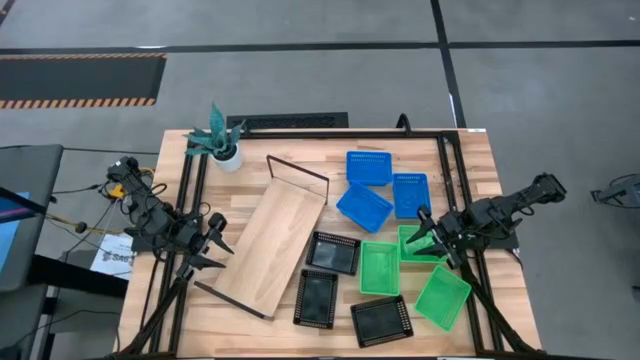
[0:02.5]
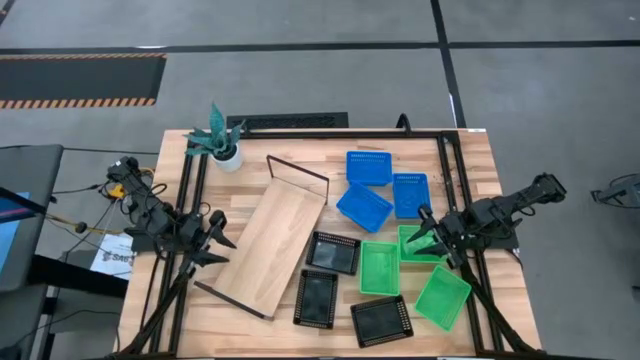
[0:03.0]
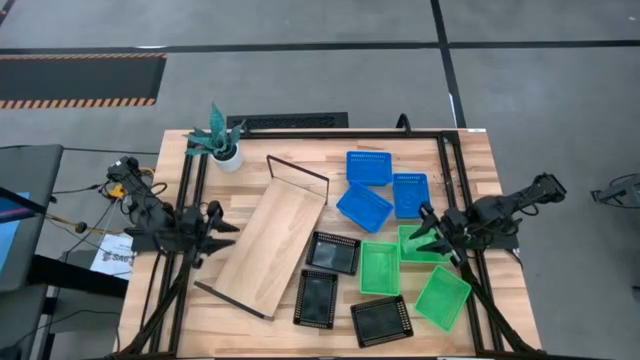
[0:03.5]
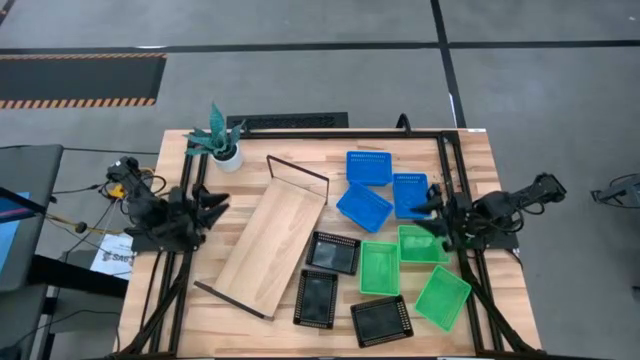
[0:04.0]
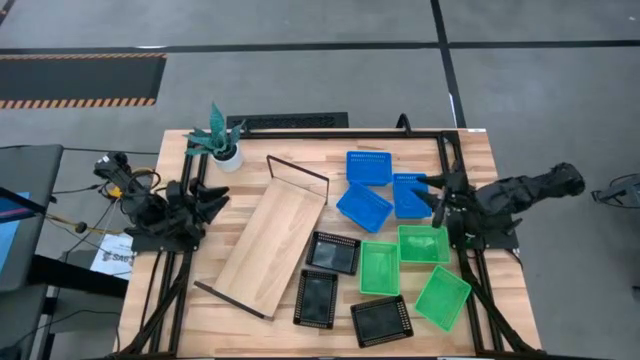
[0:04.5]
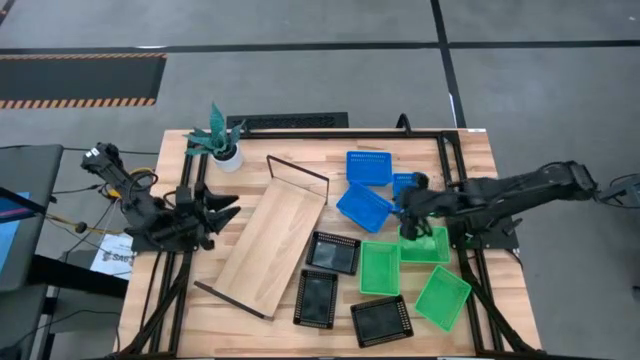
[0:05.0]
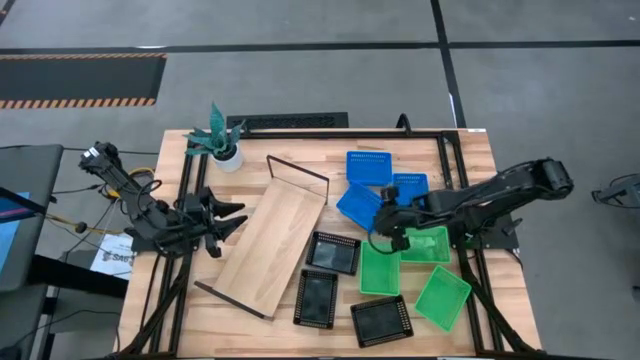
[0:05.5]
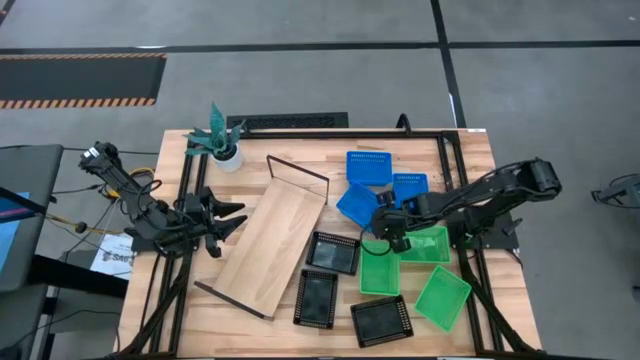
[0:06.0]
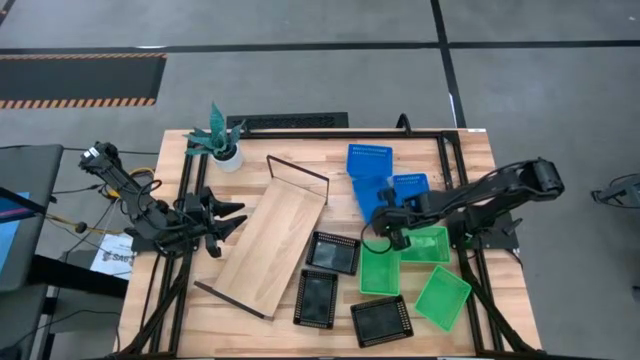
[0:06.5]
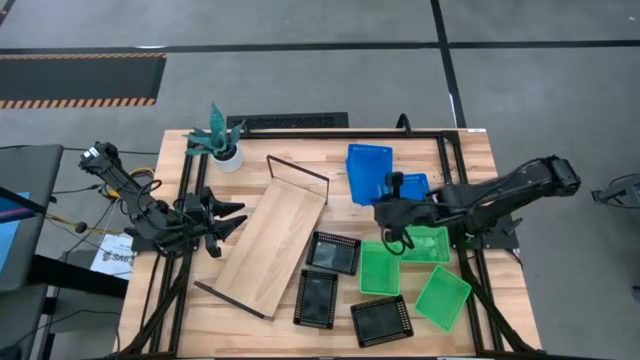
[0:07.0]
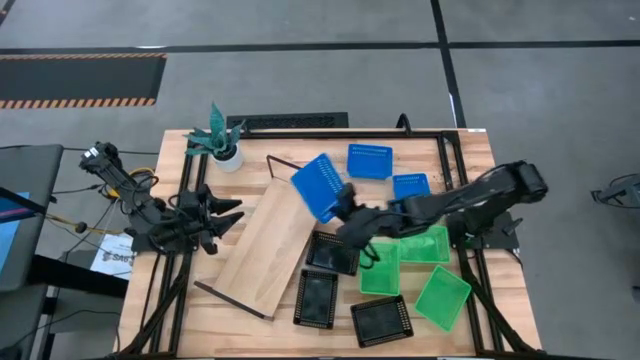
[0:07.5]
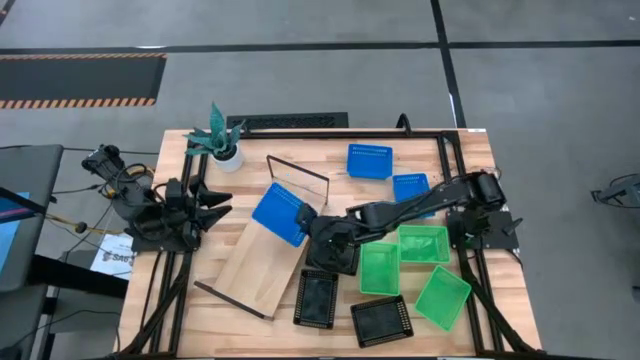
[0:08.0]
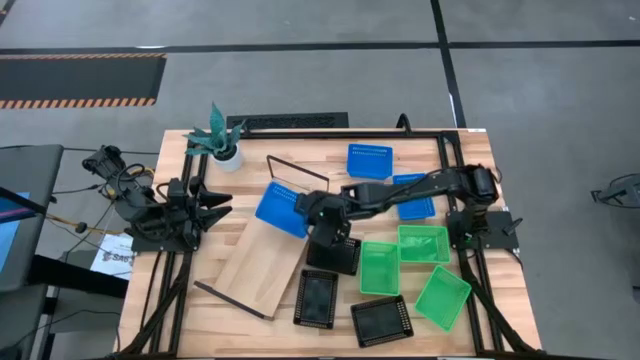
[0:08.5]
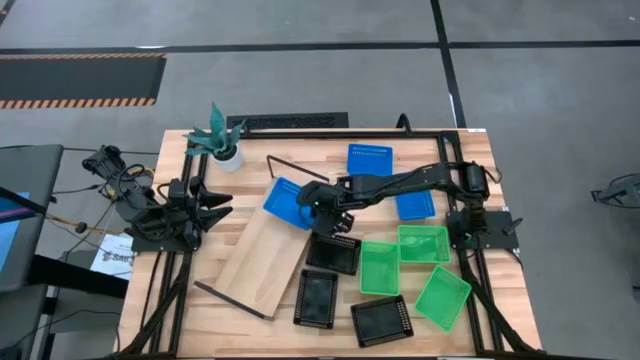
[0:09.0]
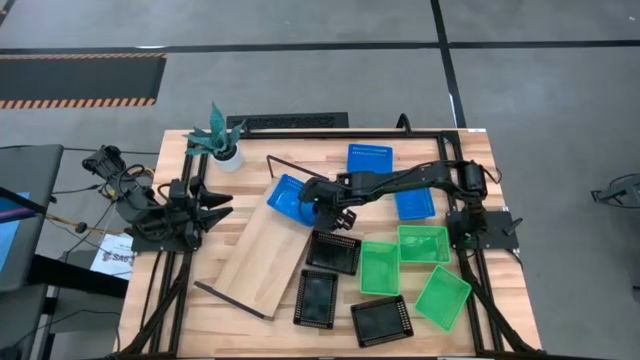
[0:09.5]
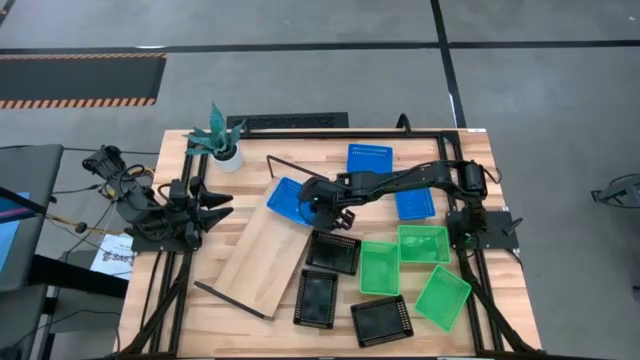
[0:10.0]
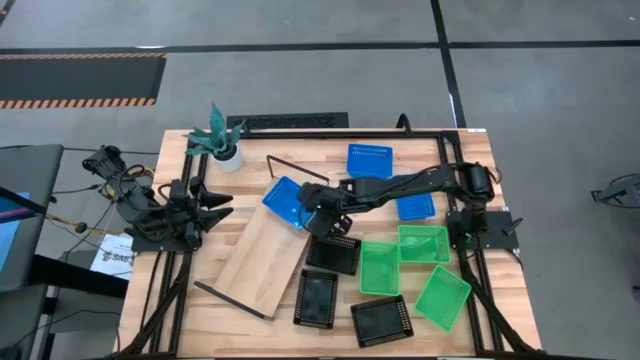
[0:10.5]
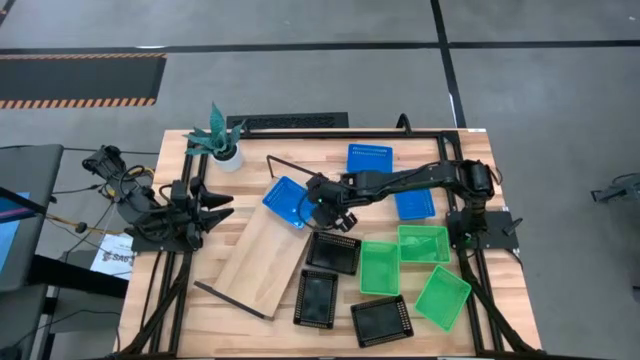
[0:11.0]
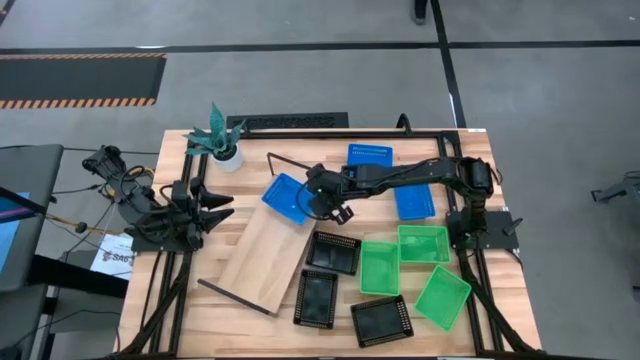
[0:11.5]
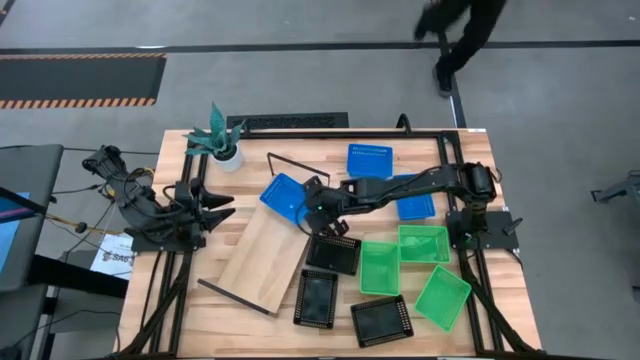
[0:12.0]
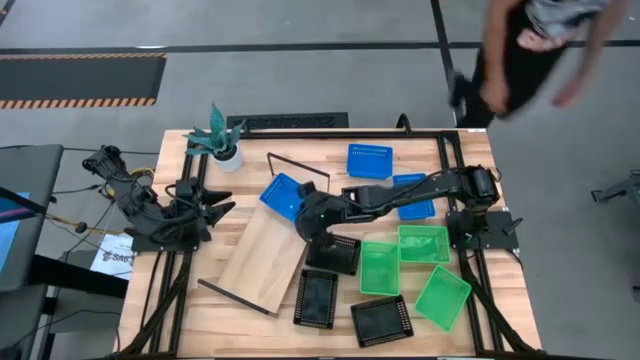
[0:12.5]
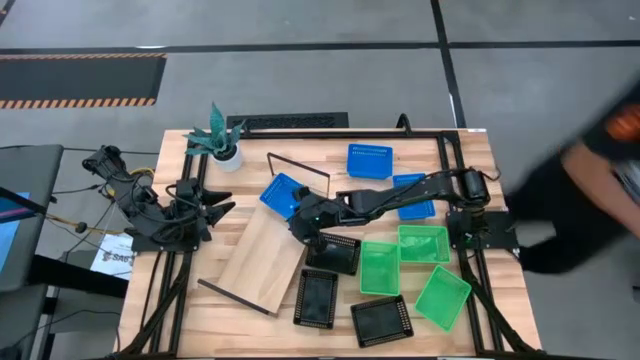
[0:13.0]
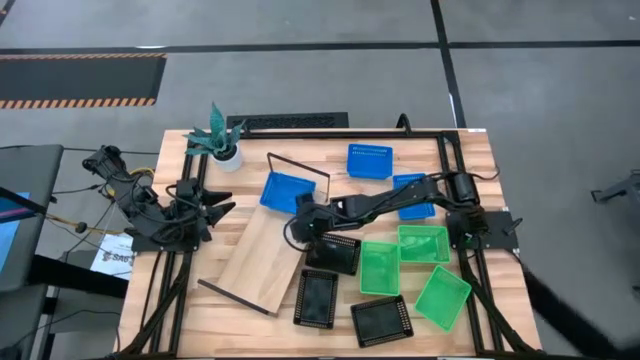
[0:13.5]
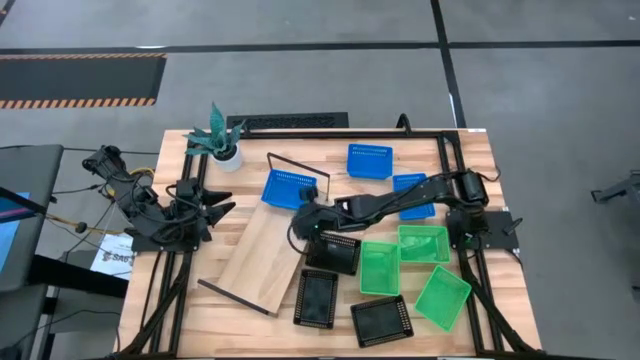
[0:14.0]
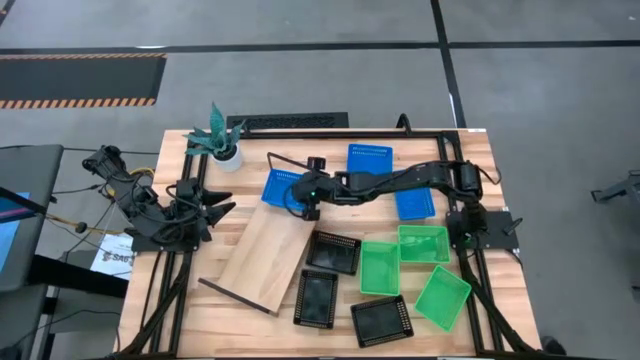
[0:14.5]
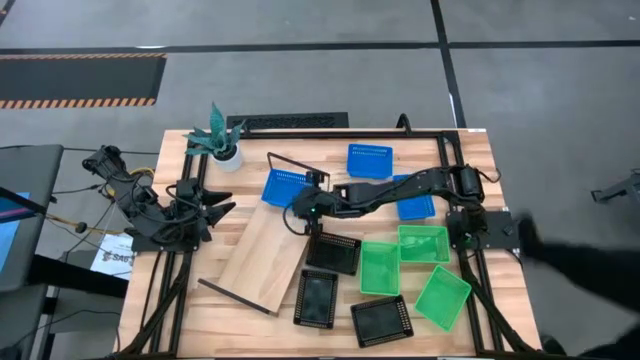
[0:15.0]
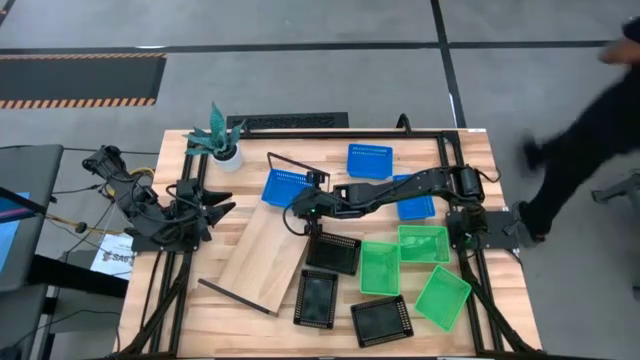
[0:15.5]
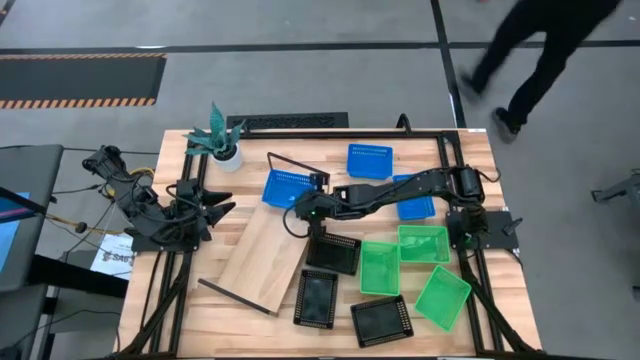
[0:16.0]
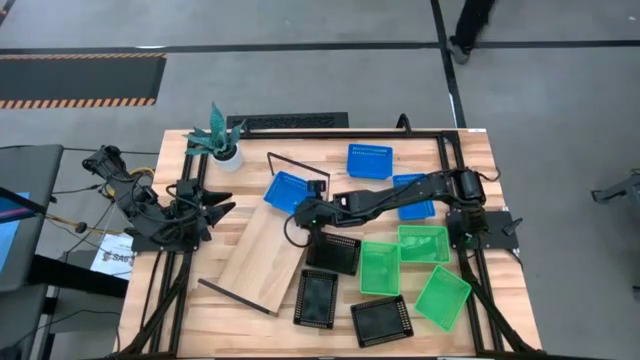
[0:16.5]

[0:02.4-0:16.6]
Task: Stack baskets on shelf by color
Put the bottom left blue bin on the shelf

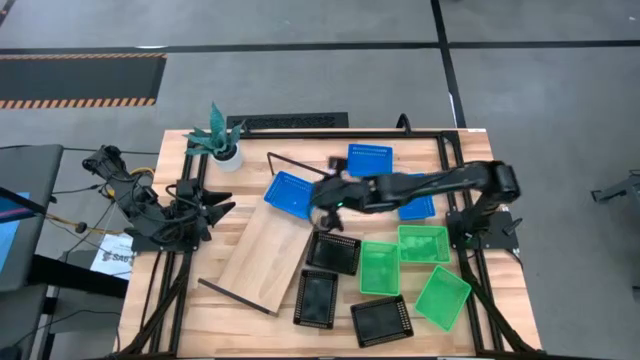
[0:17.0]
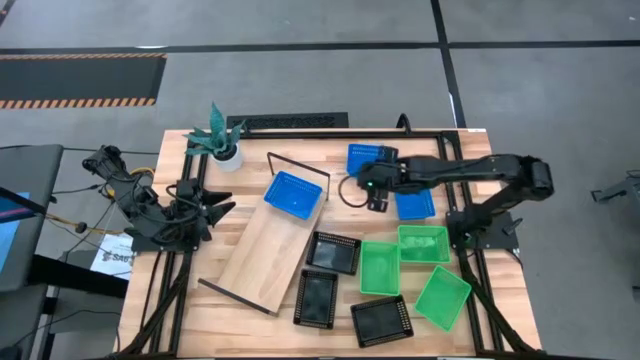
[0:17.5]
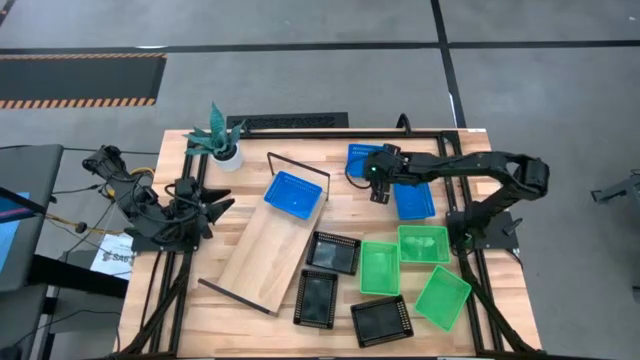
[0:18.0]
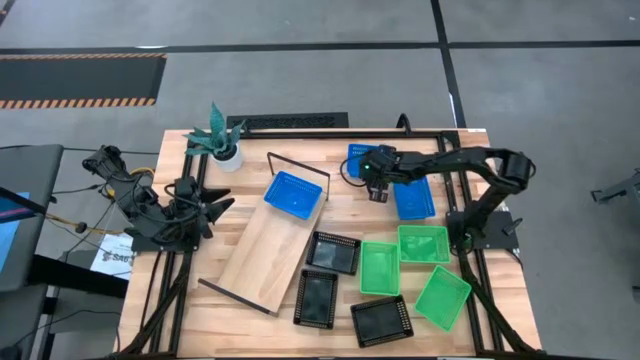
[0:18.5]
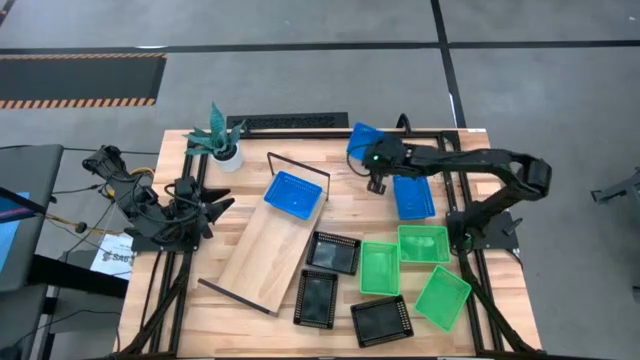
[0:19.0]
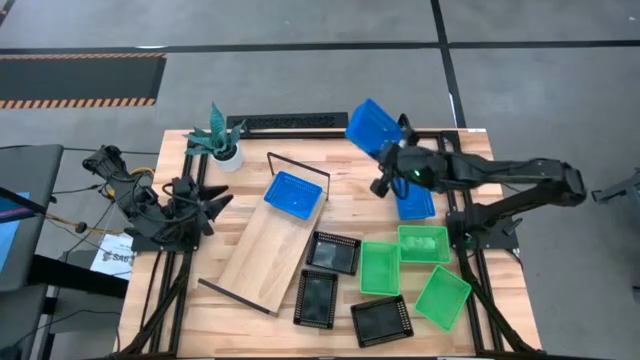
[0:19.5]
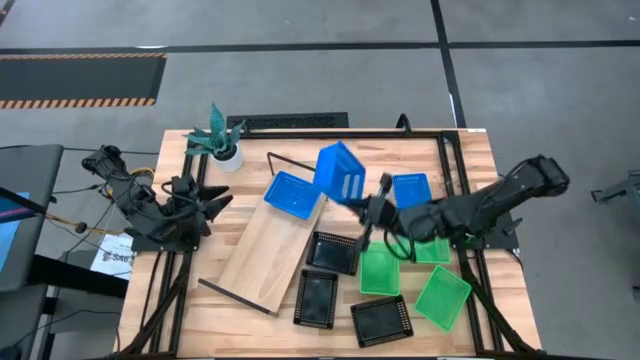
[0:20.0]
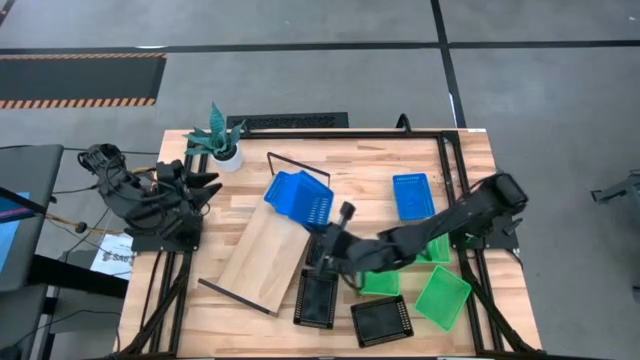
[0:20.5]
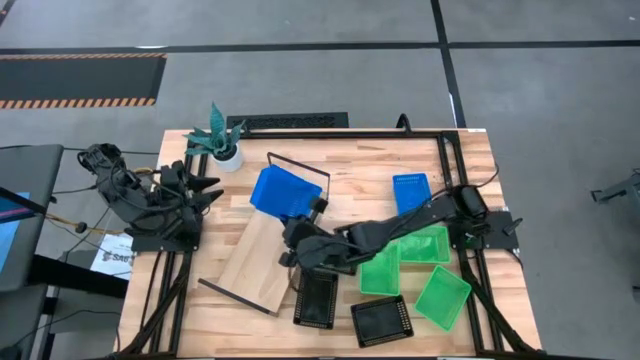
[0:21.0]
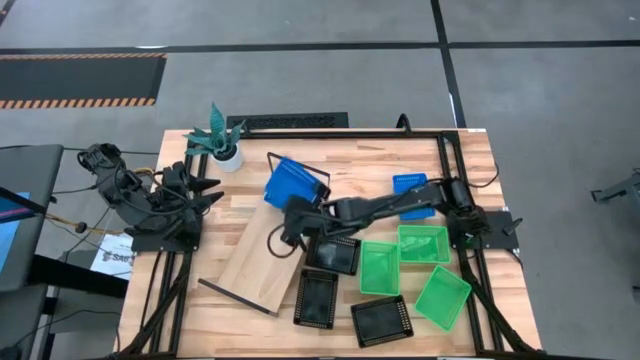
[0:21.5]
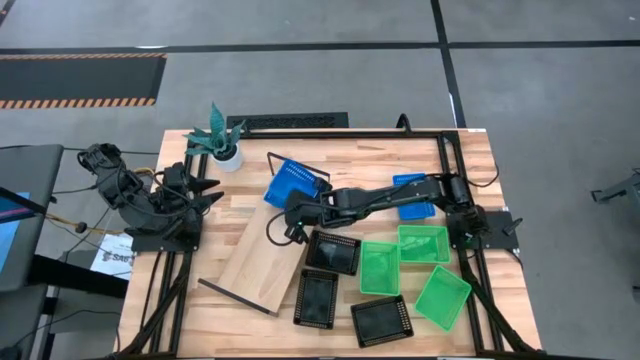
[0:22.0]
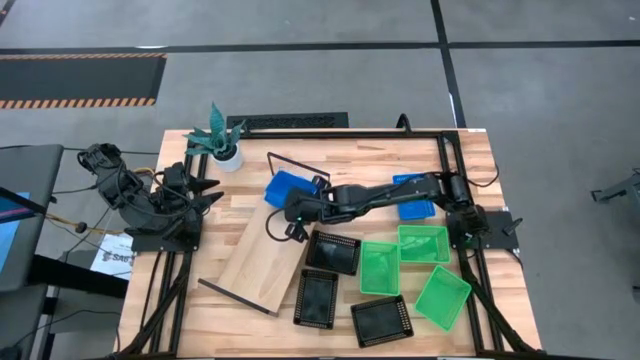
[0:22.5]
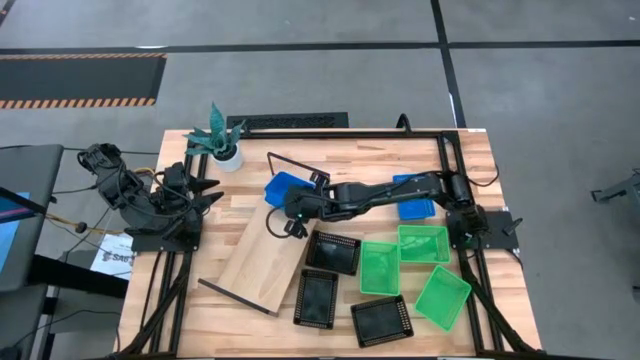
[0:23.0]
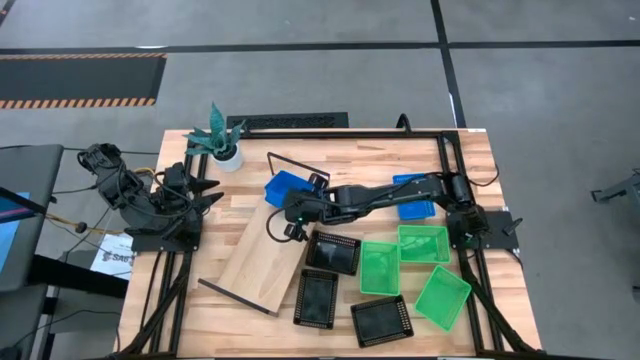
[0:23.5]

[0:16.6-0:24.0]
Stack the top blue bin on top of the blue bin on the shelf
